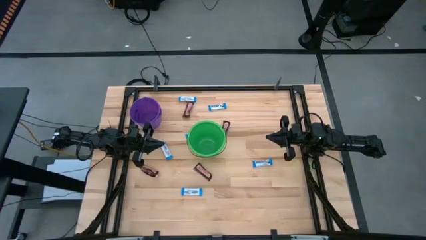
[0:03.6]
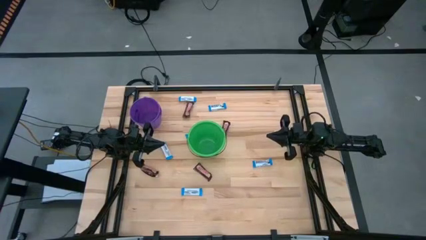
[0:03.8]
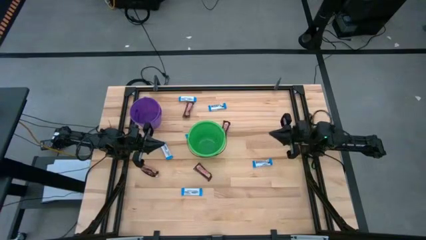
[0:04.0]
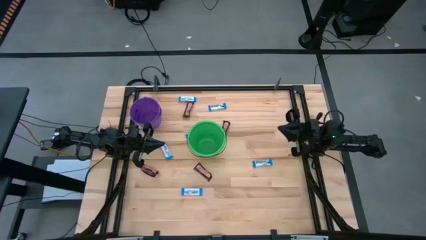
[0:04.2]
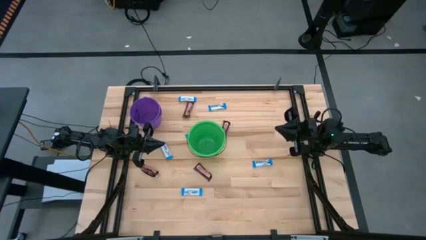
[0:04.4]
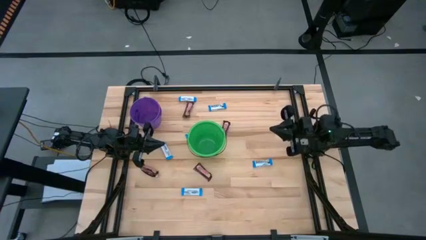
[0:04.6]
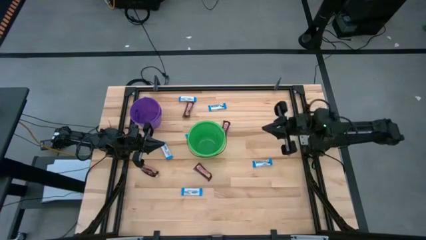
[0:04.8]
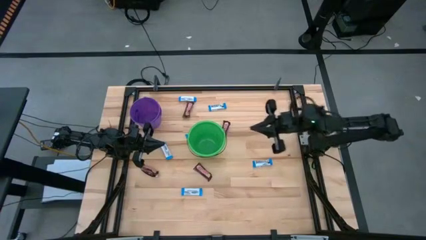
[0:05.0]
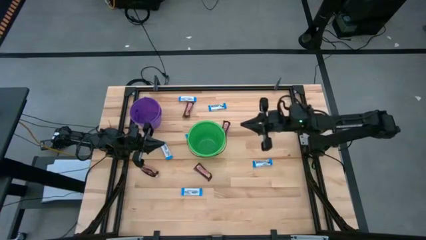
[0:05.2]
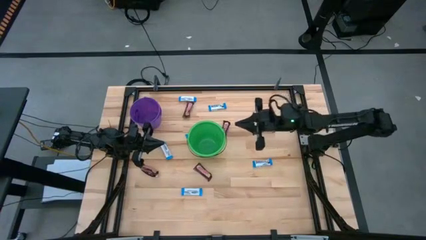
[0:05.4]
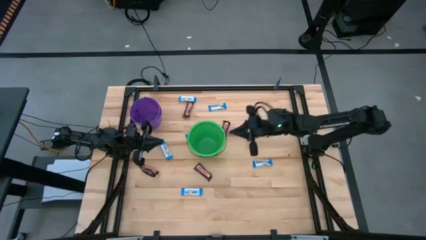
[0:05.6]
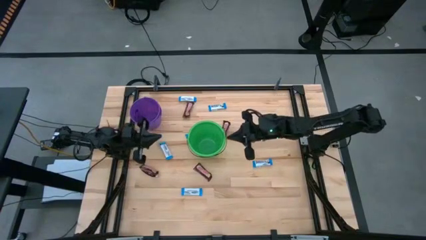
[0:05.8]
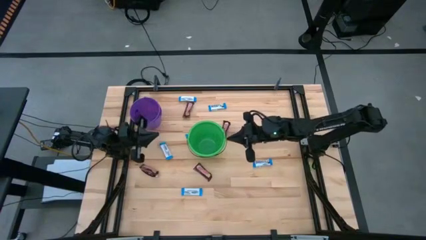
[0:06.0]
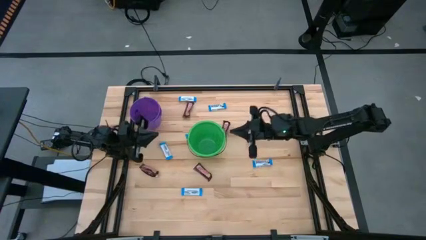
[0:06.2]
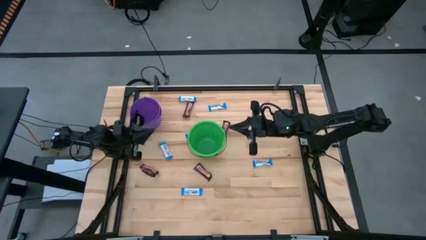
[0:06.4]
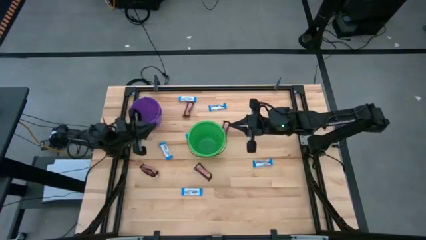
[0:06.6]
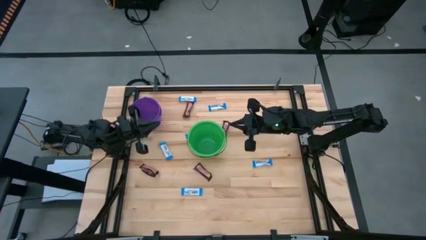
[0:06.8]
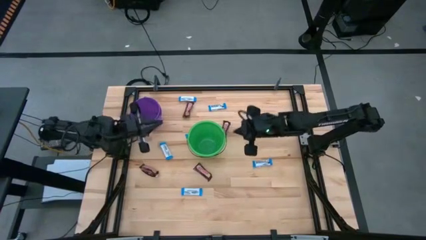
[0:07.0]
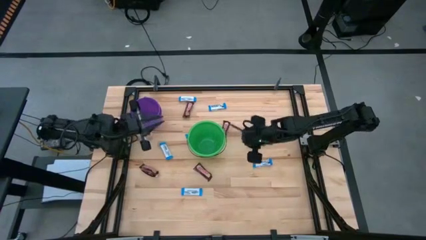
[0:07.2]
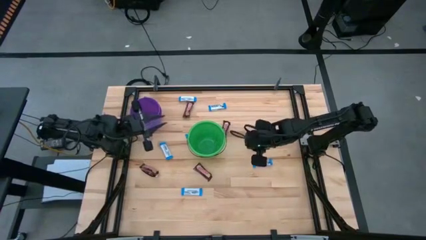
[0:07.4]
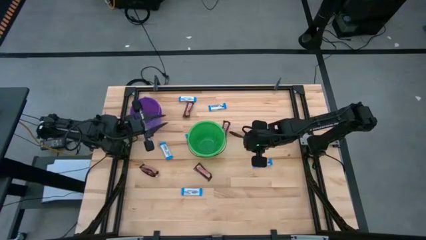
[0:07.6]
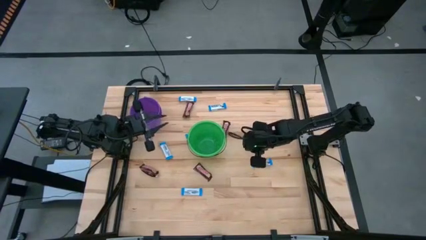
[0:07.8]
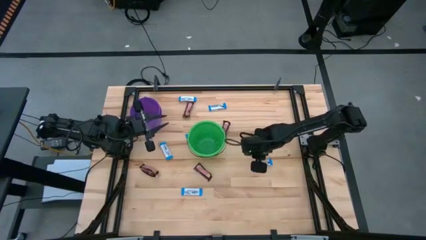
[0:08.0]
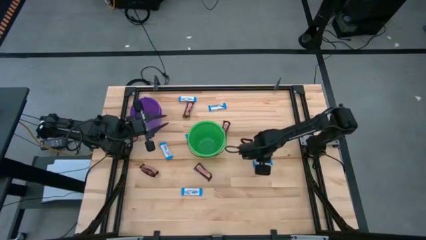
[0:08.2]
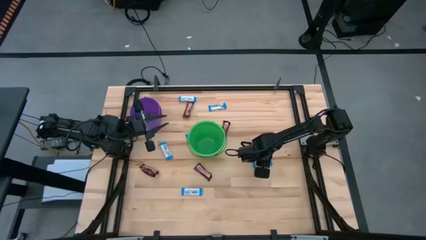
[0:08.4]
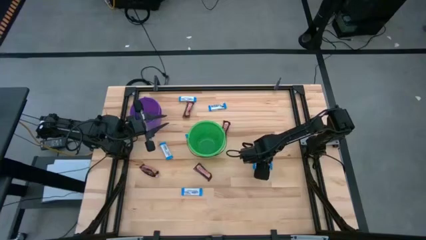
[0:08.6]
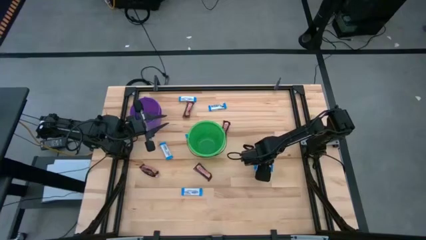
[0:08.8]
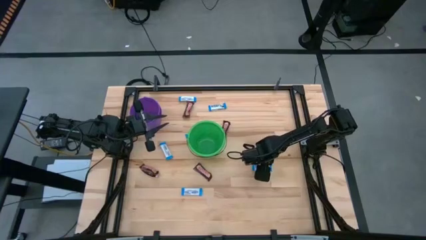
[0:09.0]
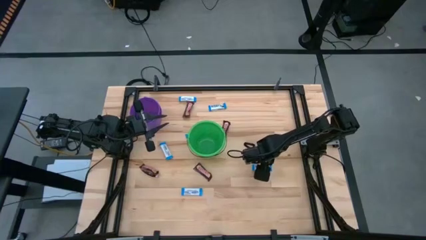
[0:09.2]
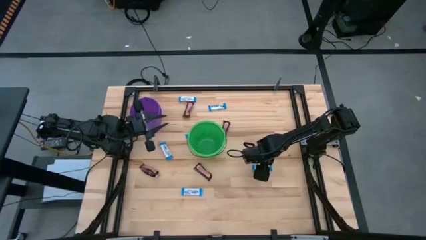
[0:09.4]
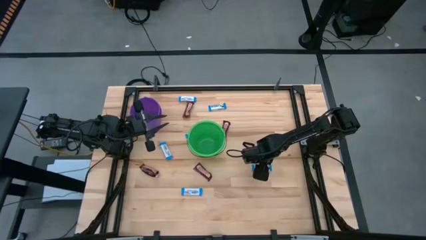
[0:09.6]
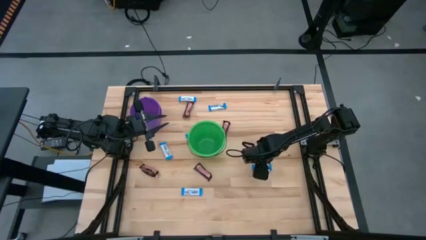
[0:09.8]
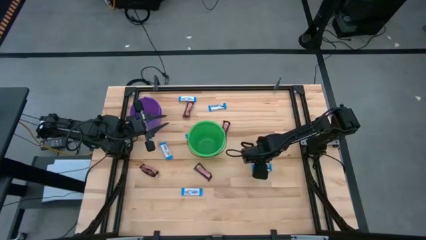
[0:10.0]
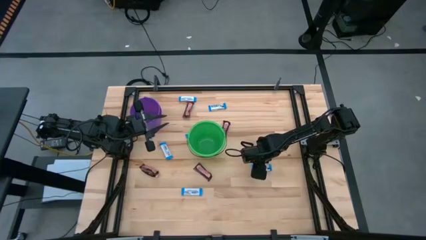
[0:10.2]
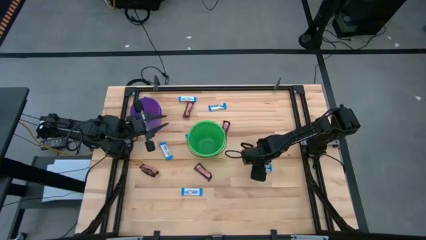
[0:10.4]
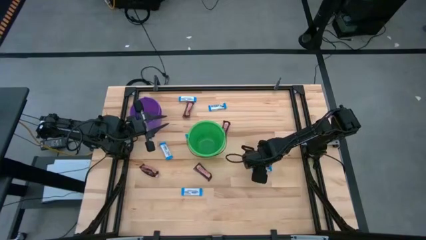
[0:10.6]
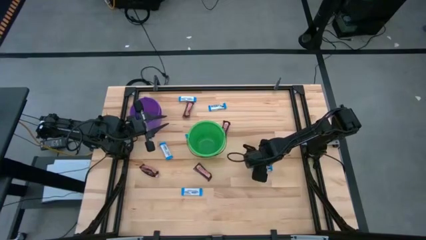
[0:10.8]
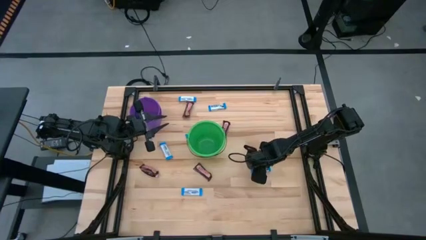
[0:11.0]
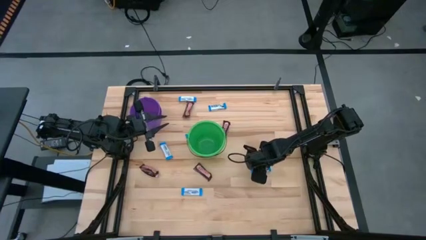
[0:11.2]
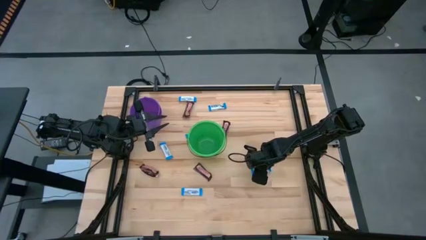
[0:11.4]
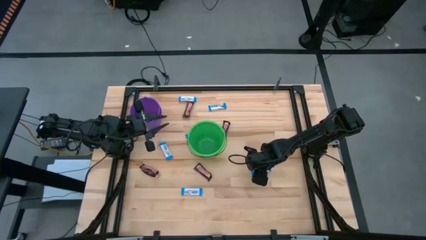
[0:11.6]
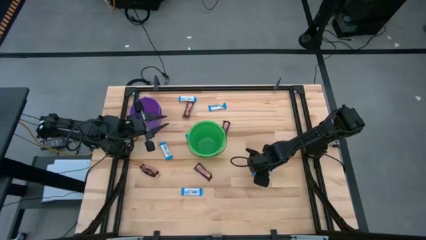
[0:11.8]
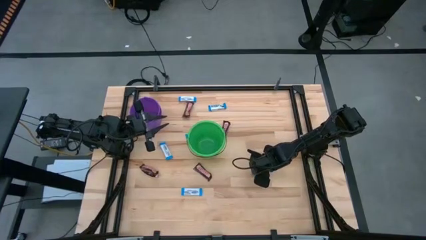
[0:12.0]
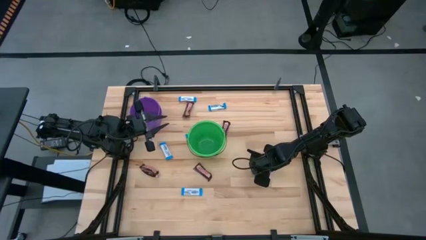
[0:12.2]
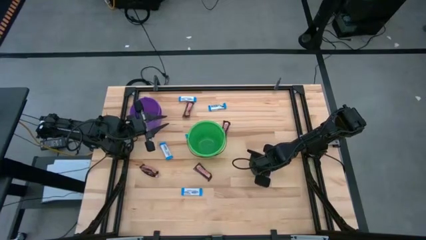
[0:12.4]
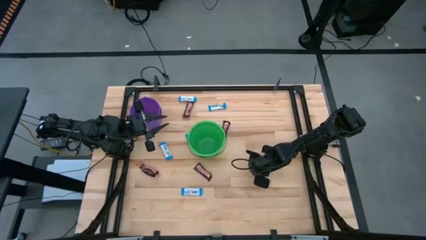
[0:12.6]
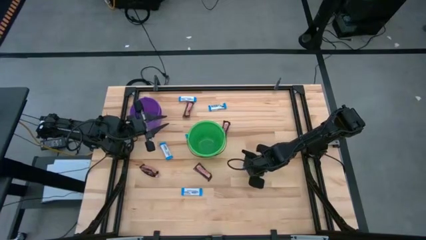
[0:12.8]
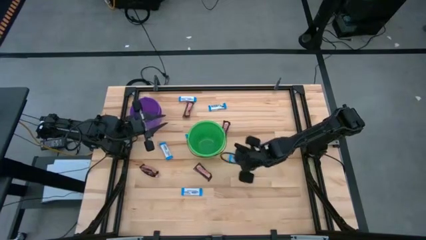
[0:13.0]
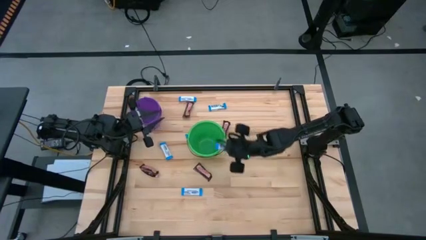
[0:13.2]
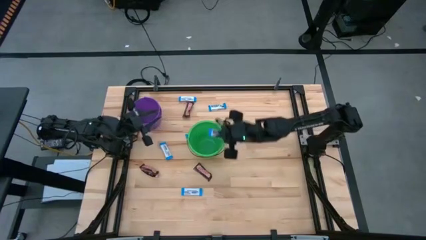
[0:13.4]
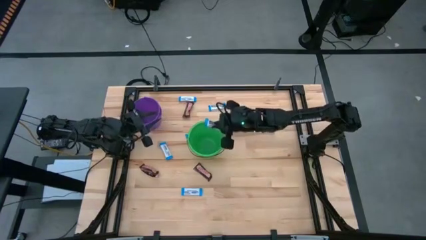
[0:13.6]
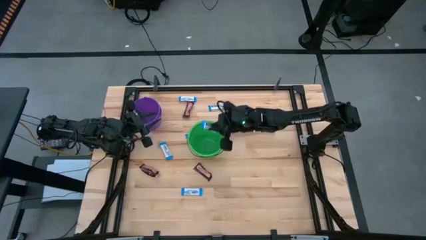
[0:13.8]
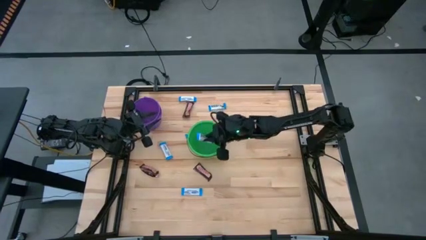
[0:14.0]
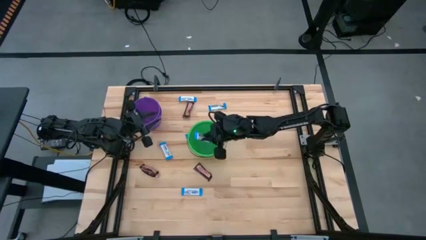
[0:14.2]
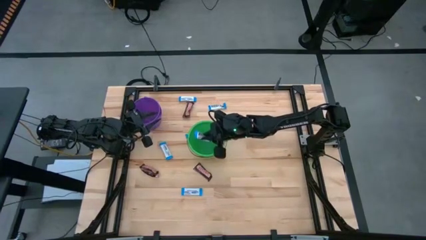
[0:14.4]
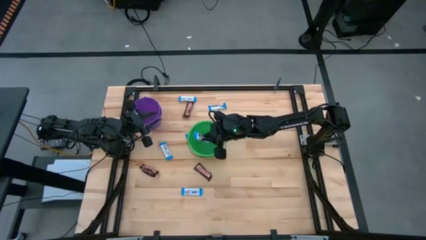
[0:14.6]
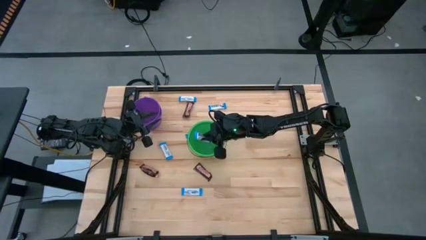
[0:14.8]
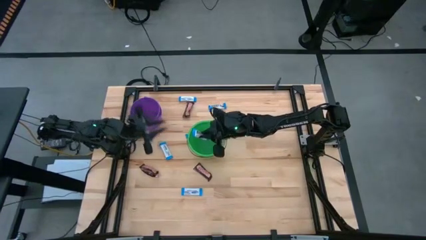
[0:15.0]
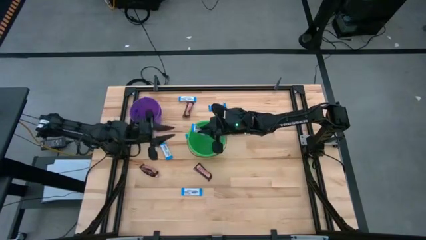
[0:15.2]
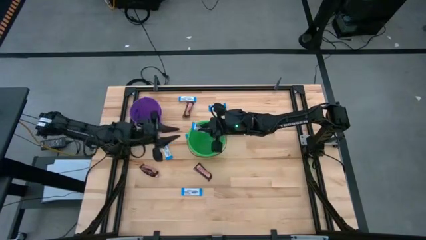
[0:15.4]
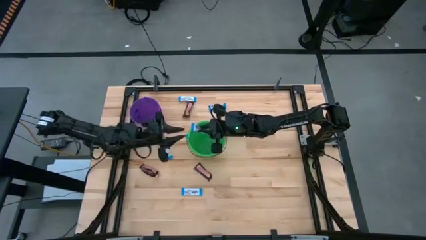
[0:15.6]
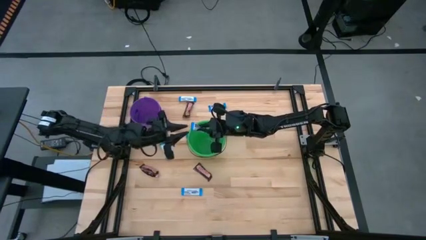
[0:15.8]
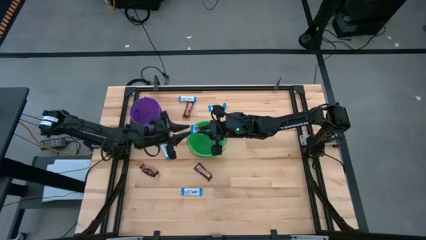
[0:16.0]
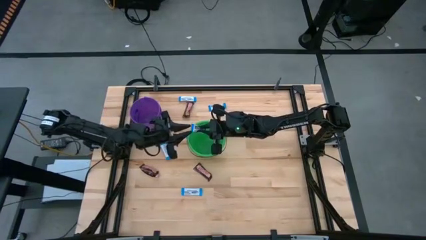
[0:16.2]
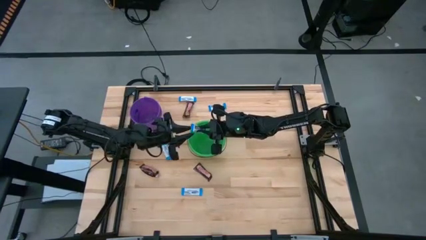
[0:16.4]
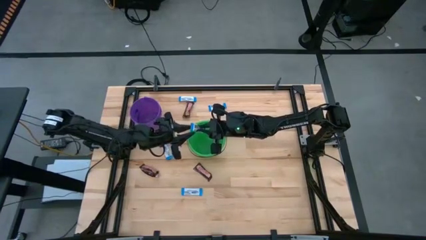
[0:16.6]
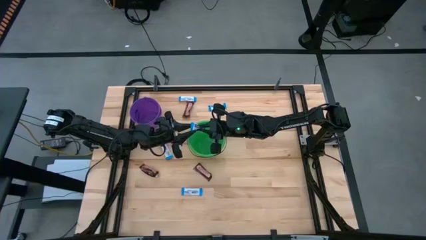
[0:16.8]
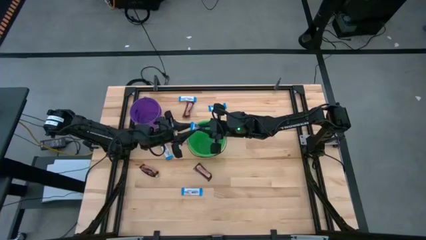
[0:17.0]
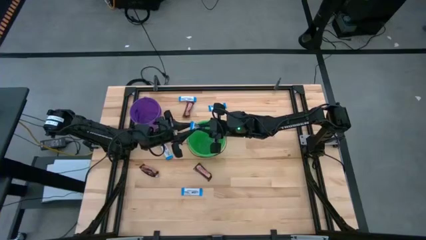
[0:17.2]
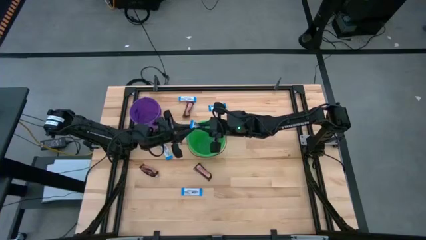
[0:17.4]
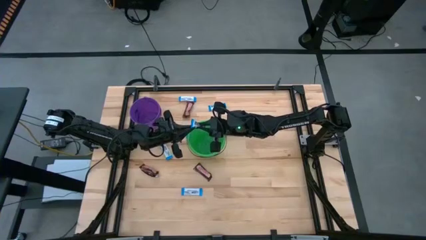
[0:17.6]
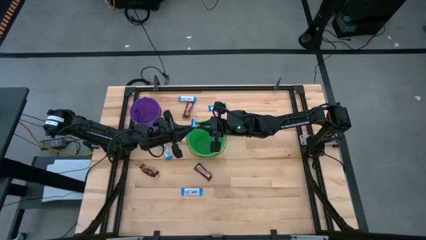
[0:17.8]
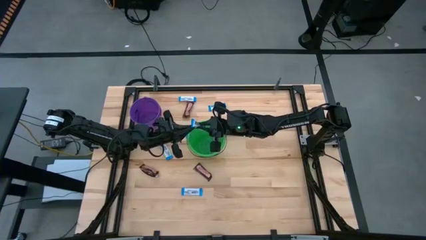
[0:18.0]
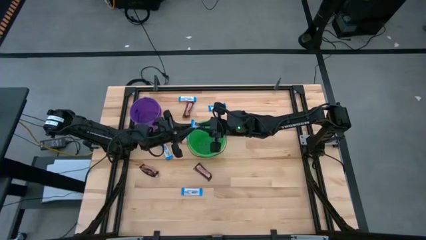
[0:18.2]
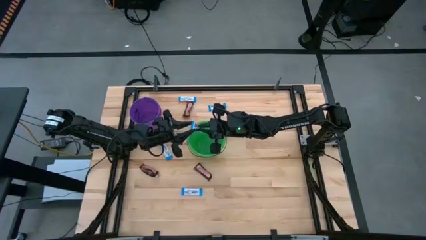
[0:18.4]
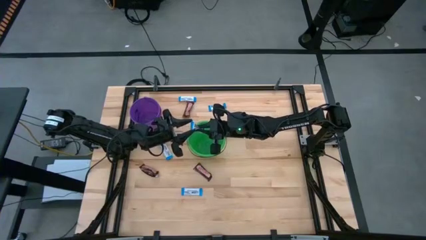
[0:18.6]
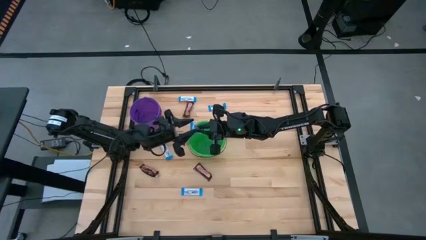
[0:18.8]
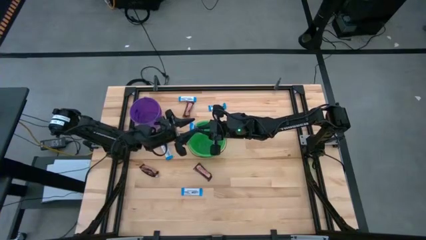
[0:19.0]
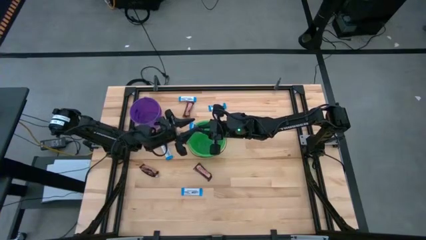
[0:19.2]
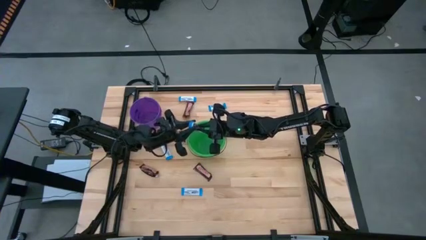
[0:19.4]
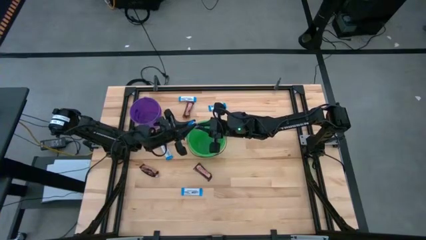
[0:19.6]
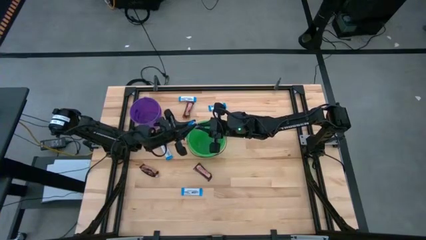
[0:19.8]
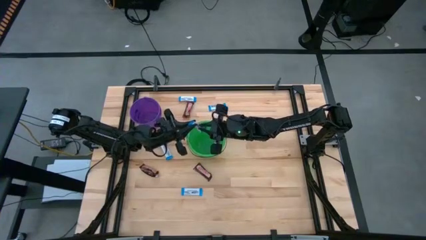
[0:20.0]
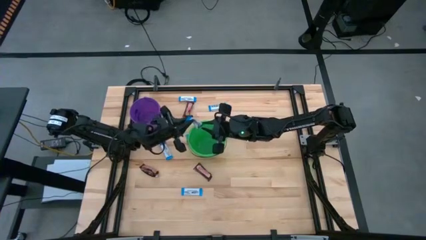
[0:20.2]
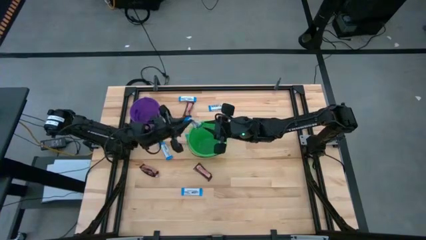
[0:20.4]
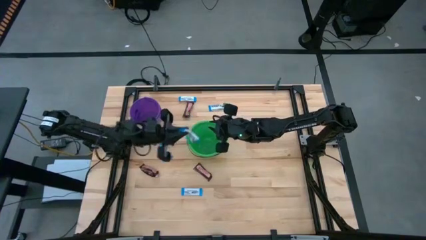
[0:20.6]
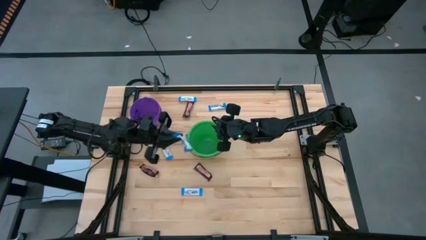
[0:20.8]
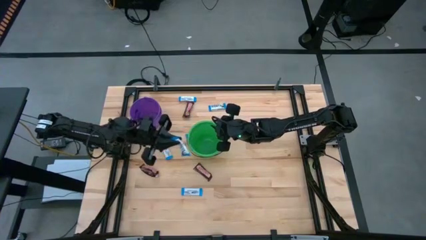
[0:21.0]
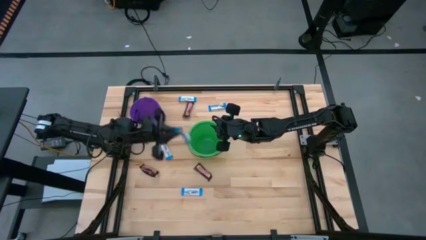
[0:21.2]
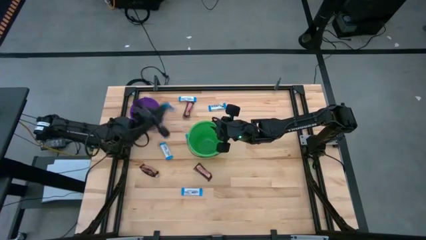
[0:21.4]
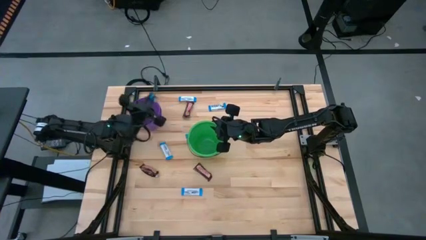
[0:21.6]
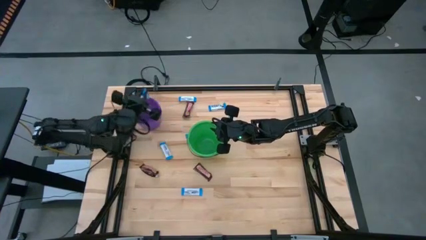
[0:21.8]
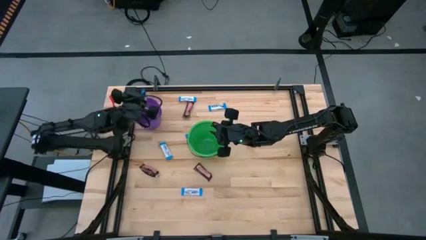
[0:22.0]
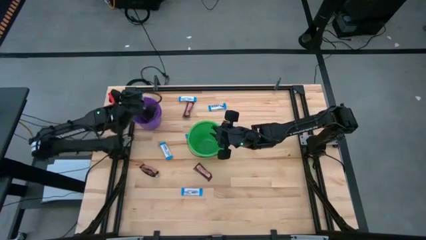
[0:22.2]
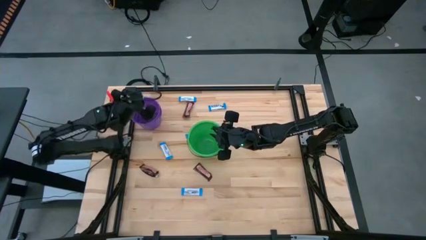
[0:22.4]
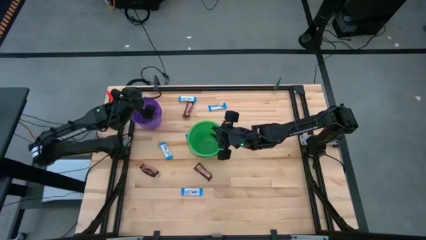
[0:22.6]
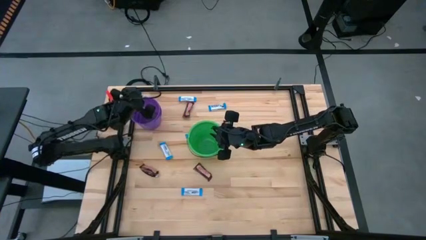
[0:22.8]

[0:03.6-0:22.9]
Task: Sort candy by brand, put in halloween buckets
Put the white chocolate bar into the violet bucket
